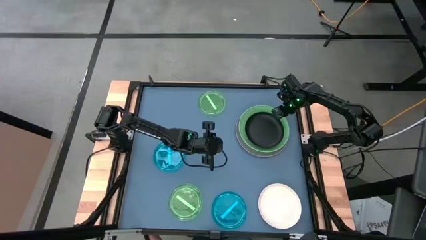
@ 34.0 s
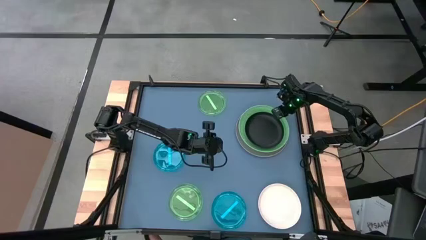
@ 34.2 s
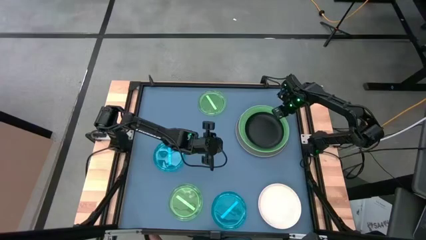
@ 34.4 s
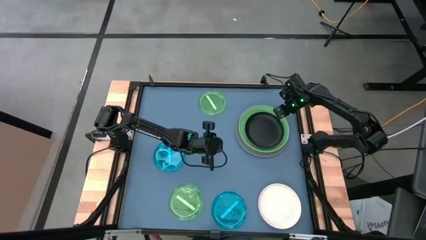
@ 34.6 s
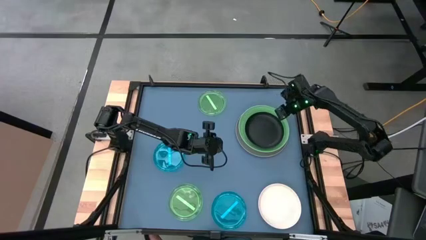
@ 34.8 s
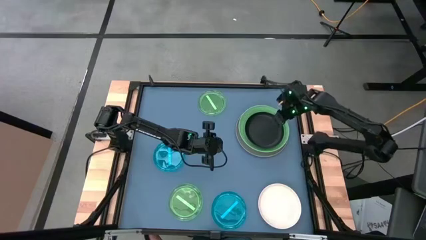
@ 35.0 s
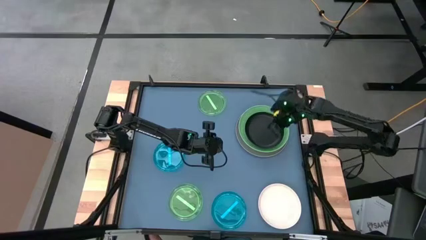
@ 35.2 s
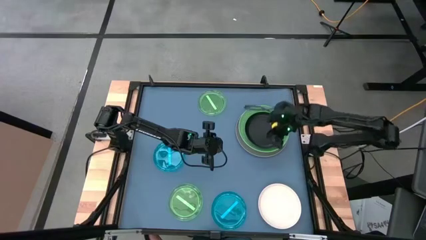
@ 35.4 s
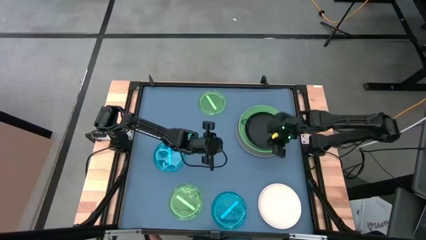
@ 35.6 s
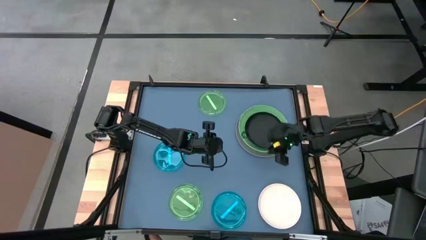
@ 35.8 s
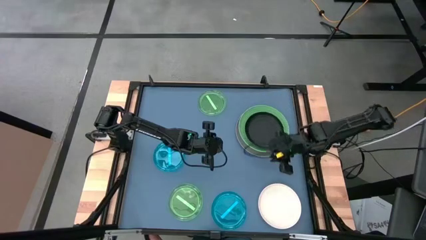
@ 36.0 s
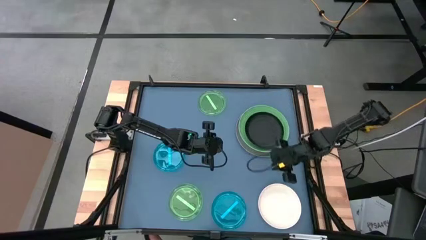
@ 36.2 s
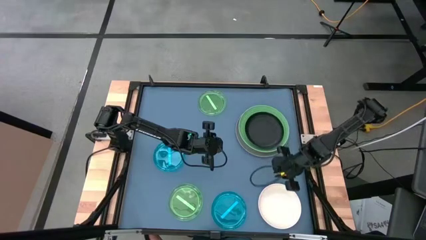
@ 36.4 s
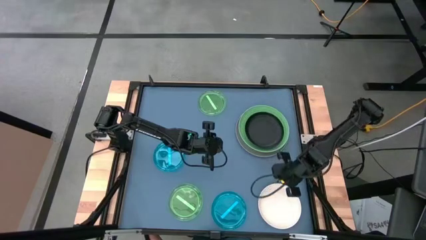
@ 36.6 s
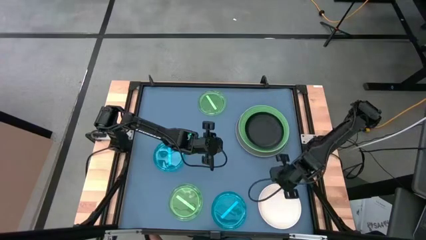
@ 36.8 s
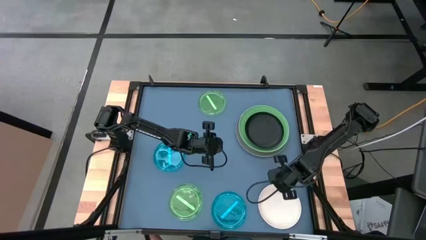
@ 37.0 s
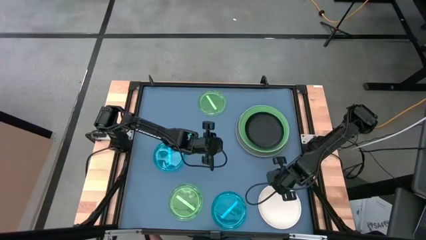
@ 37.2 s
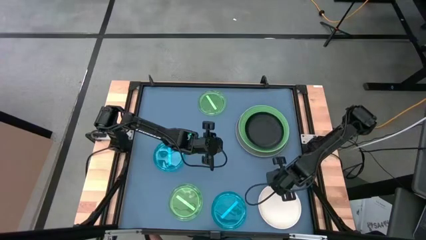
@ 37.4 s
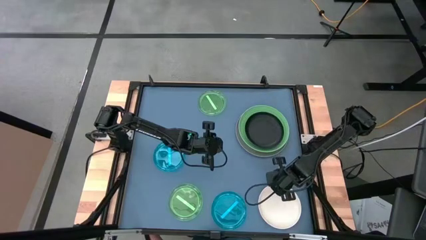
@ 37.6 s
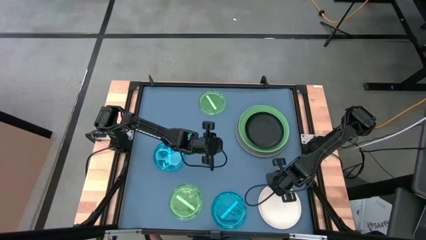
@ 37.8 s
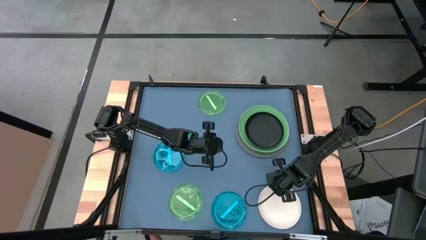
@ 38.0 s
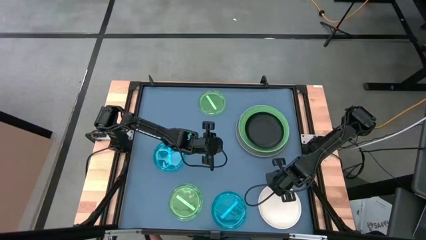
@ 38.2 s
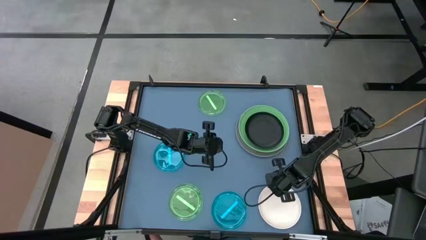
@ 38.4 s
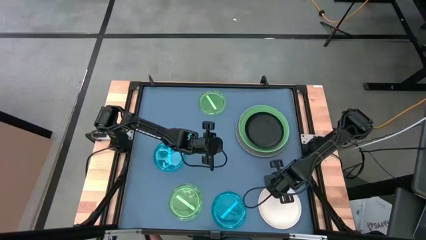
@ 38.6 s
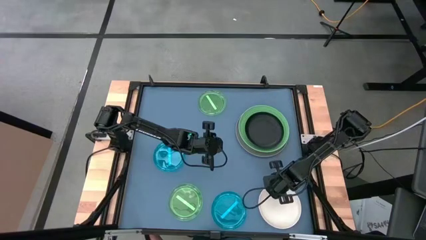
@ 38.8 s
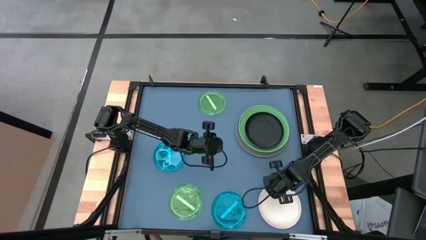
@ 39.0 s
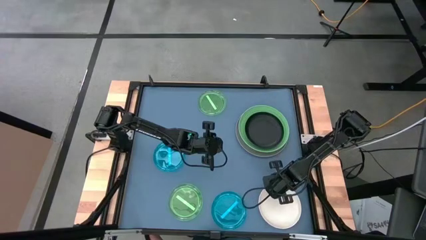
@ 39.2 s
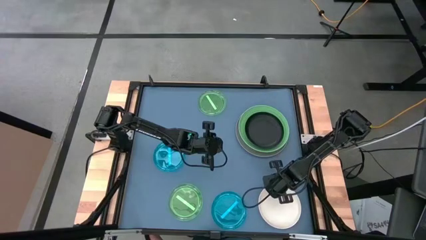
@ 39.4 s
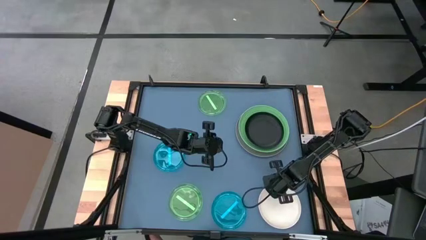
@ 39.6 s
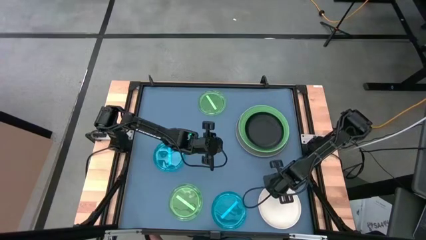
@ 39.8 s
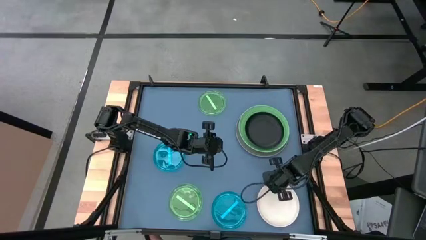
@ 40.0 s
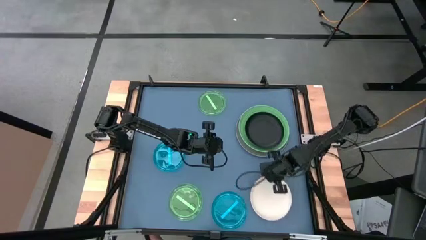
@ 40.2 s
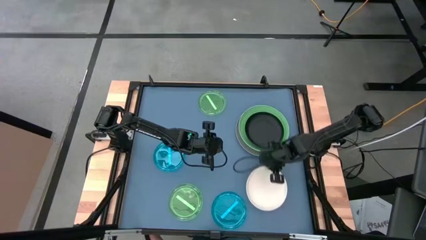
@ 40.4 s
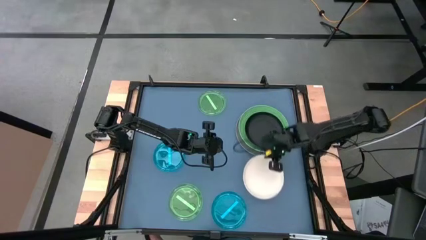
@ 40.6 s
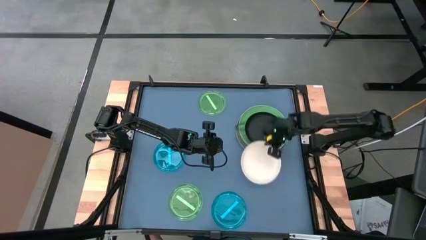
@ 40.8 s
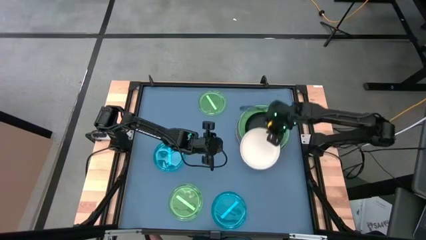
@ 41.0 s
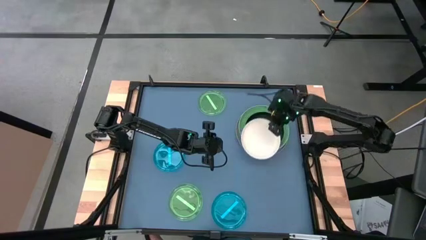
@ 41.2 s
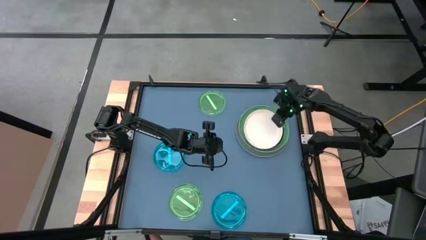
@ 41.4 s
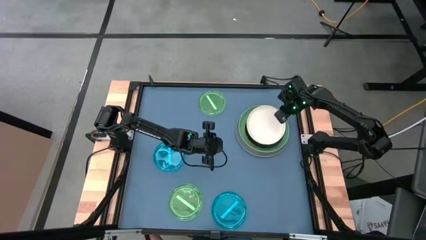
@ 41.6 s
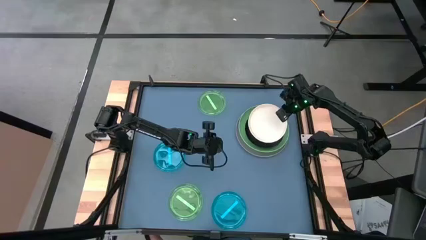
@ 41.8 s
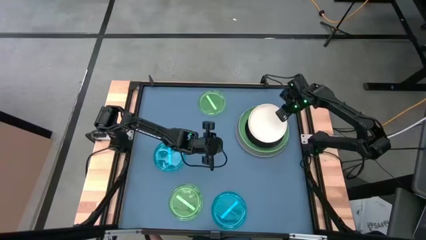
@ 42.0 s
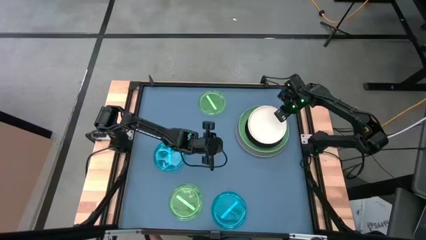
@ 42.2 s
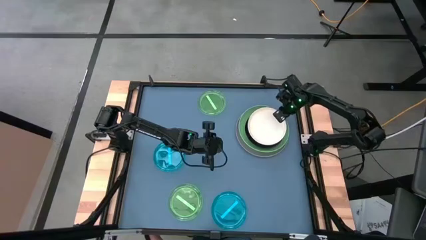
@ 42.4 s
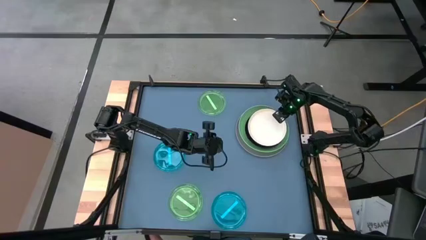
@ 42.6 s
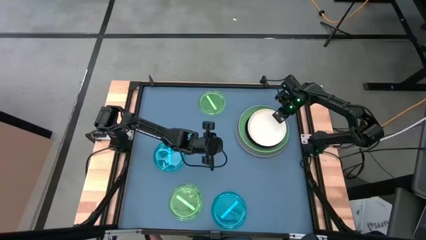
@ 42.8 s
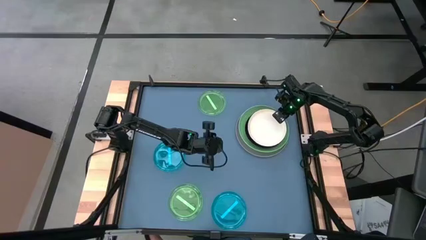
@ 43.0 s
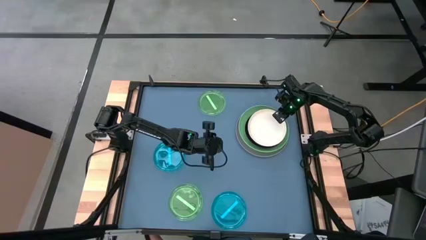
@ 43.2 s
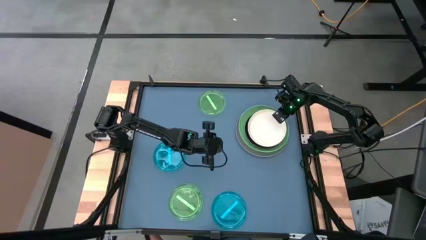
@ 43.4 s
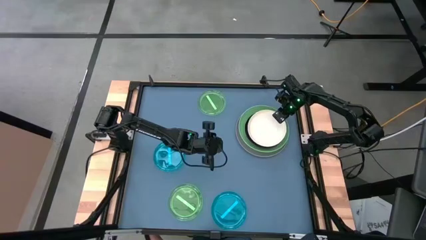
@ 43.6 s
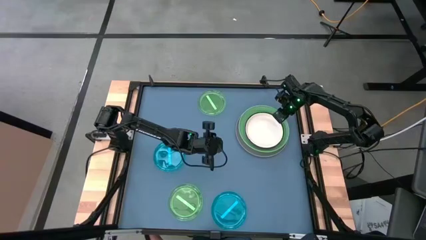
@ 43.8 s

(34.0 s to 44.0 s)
Task: Stack plastic plates
Stack the white plate on the black plate
